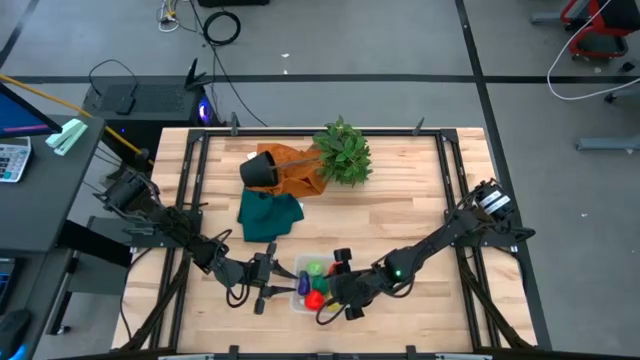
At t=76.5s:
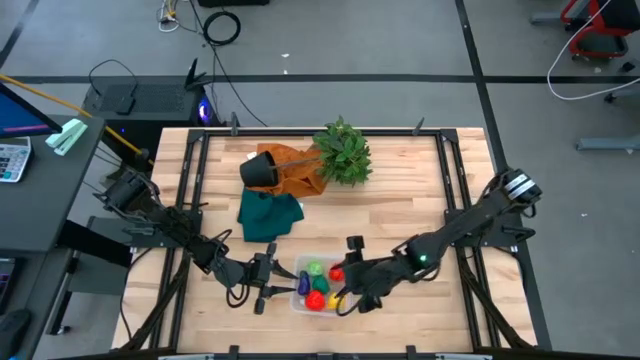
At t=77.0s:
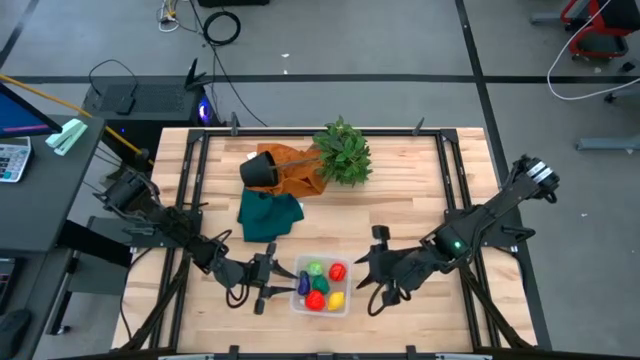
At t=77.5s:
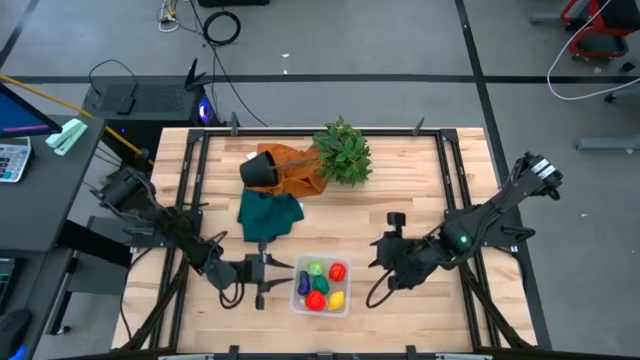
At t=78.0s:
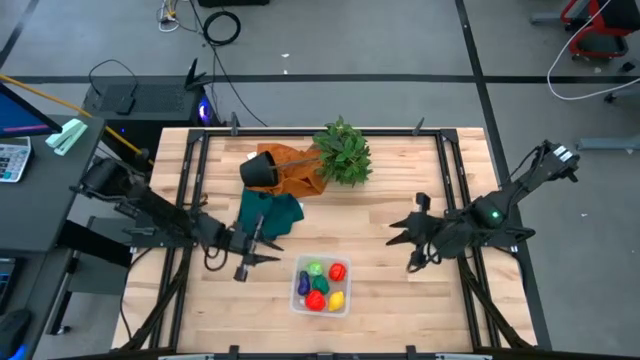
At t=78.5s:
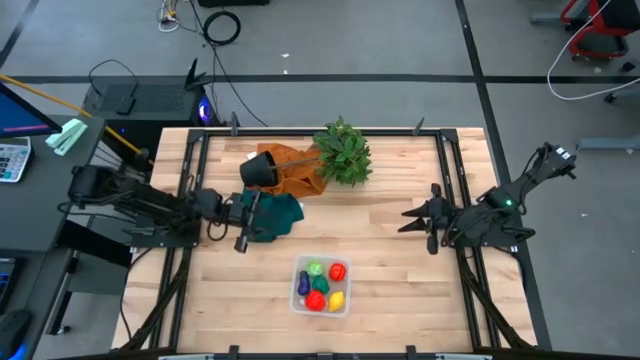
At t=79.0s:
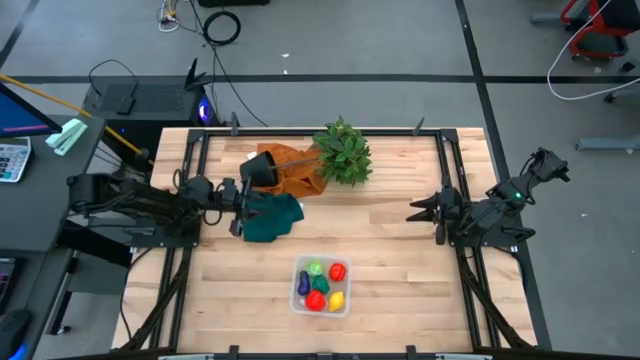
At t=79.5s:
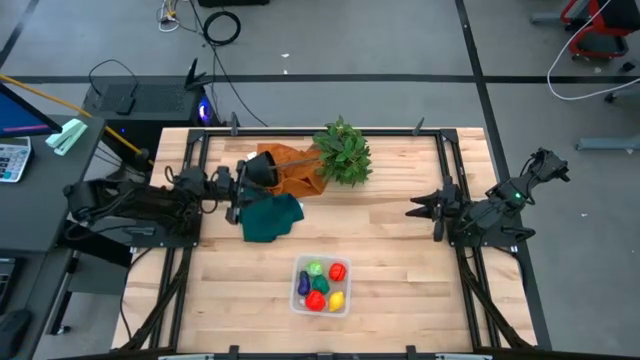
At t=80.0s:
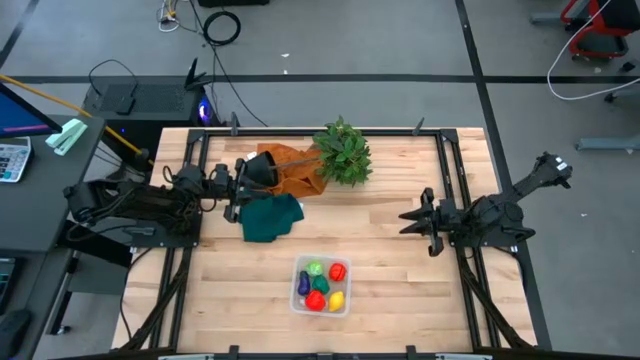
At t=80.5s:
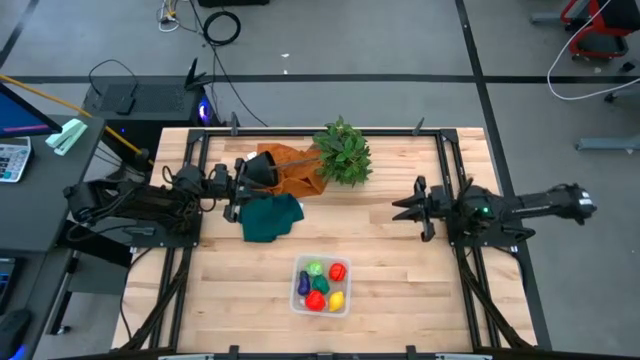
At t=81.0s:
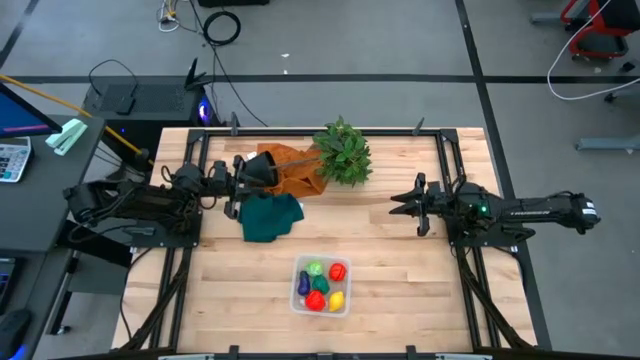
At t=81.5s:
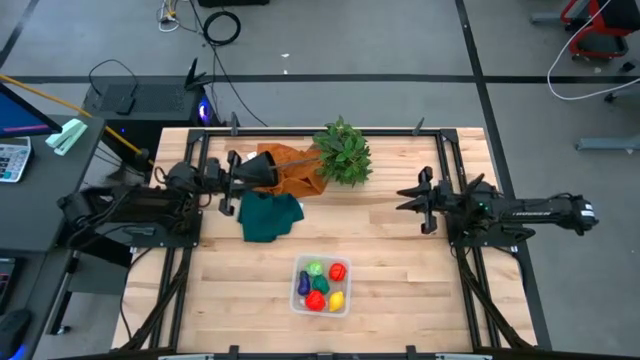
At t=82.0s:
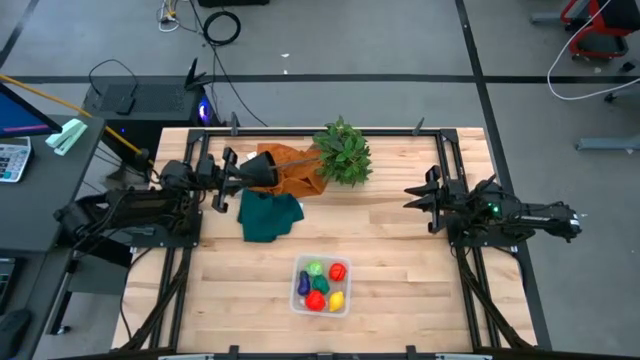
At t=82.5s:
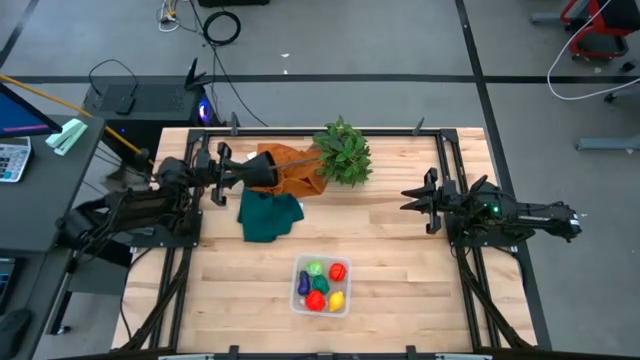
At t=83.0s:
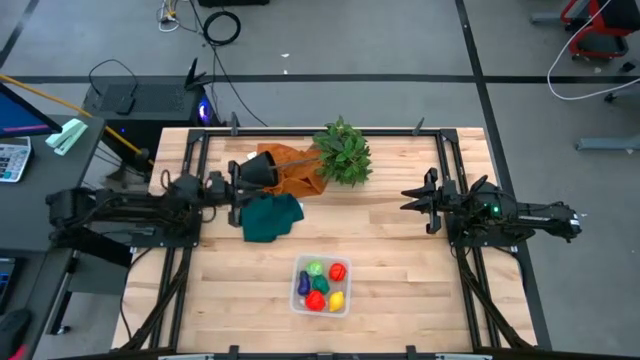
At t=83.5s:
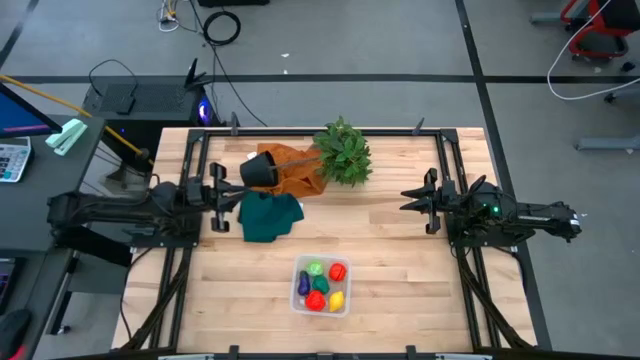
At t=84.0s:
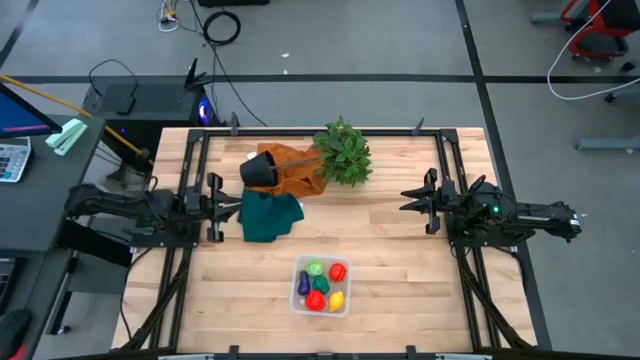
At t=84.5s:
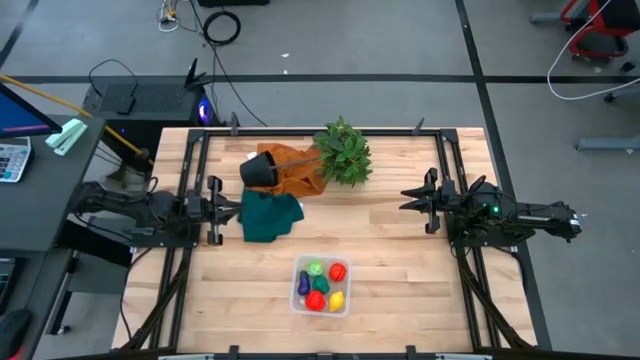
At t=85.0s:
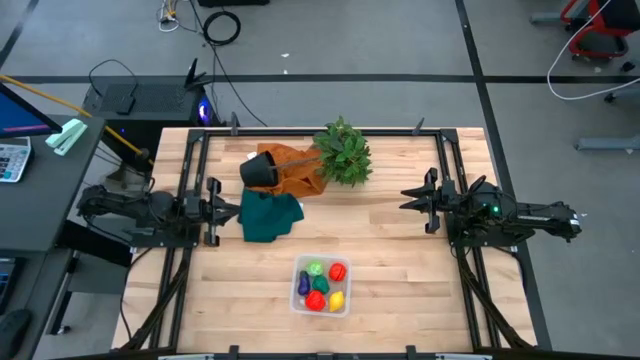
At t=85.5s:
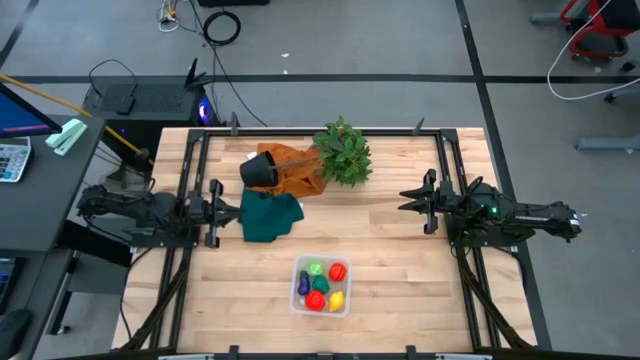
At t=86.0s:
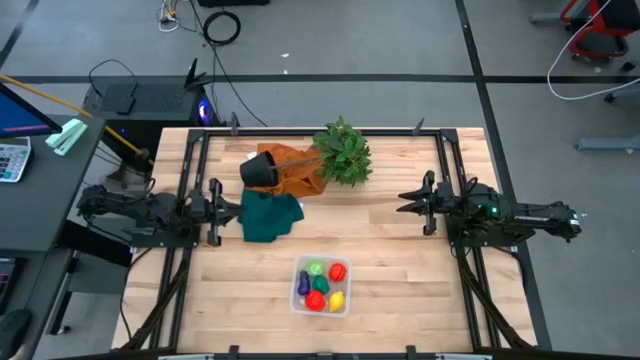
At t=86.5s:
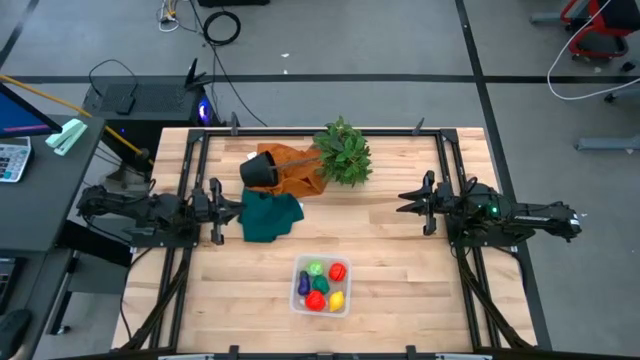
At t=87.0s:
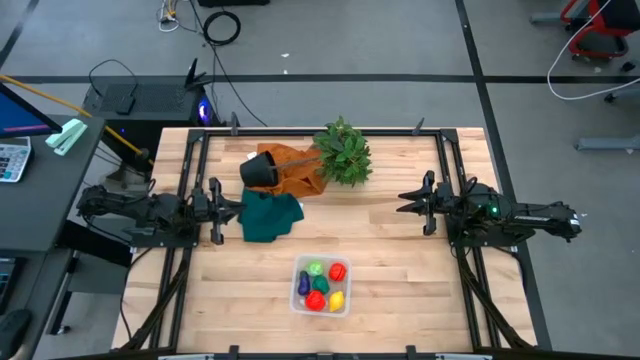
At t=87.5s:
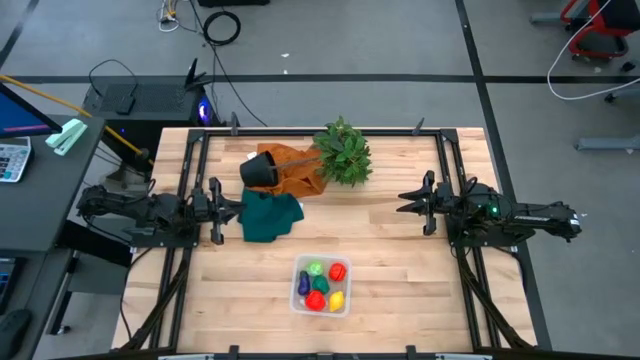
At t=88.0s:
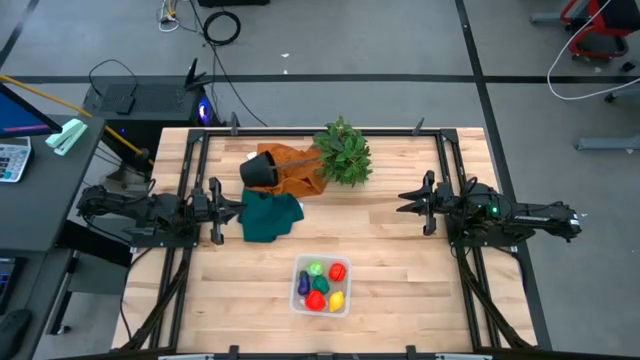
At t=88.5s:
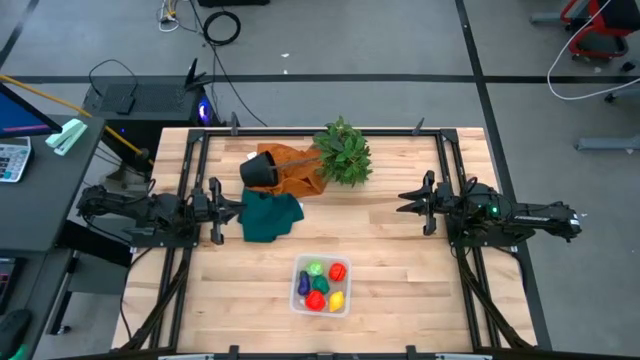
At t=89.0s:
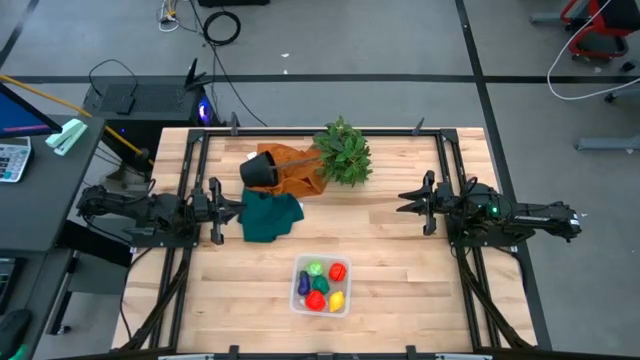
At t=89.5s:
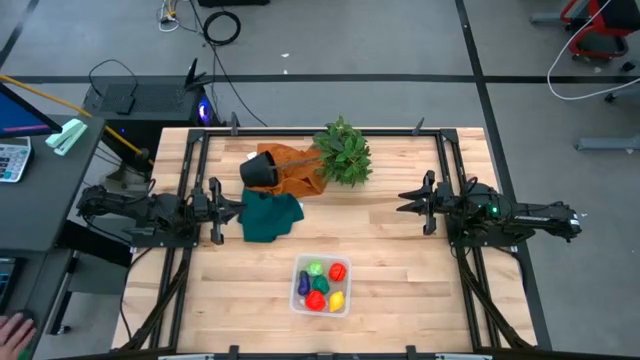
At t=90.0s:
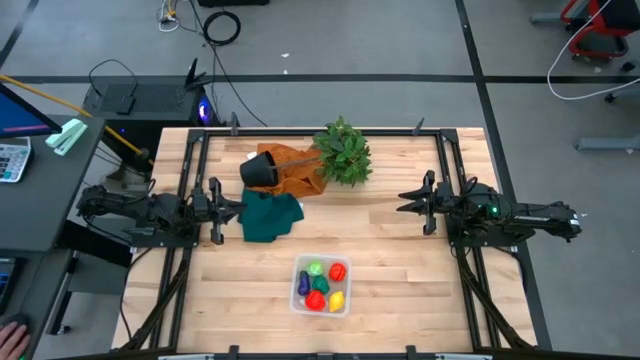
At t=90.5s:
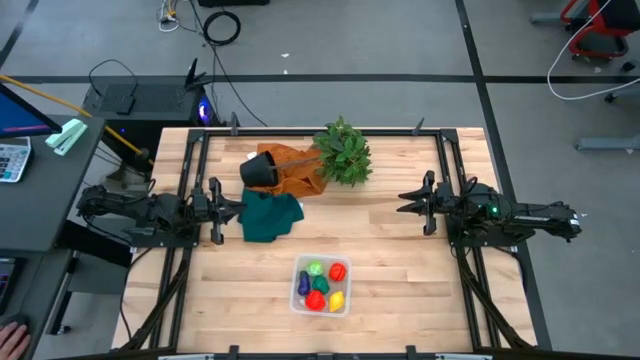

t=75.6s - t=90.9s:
Task: Pick and placing Produce into tupperware
Return to Home Position

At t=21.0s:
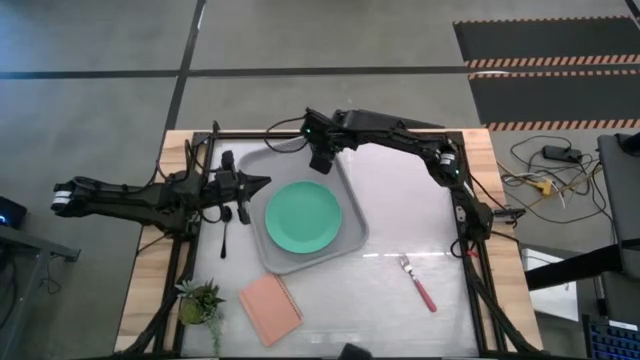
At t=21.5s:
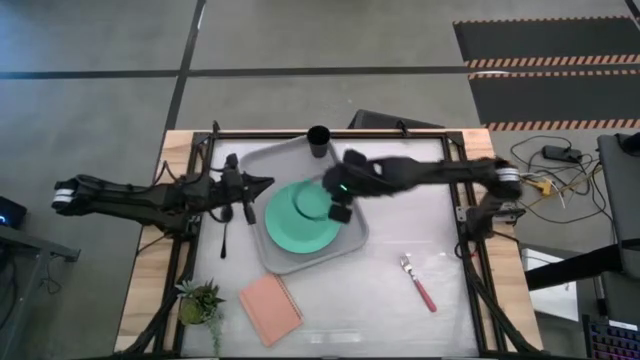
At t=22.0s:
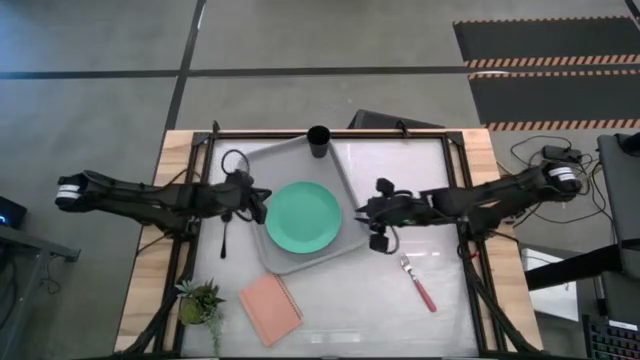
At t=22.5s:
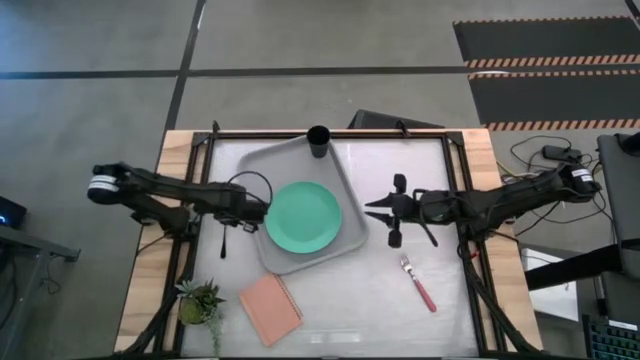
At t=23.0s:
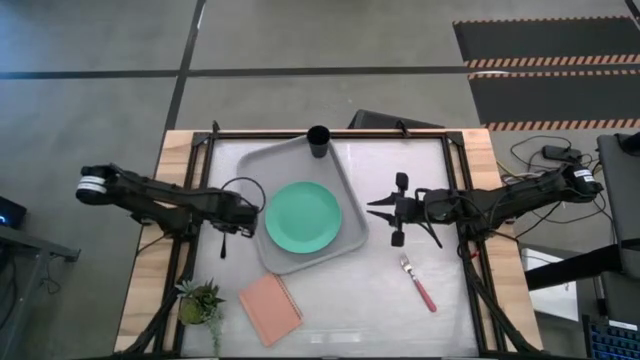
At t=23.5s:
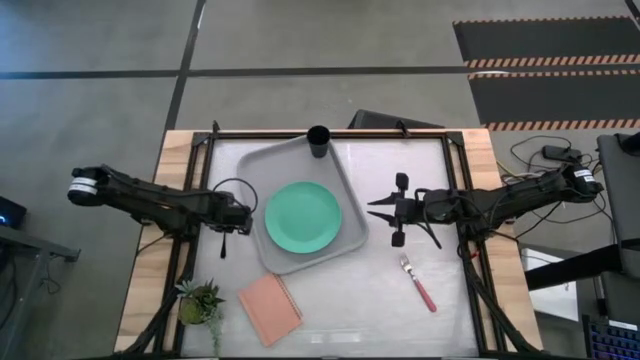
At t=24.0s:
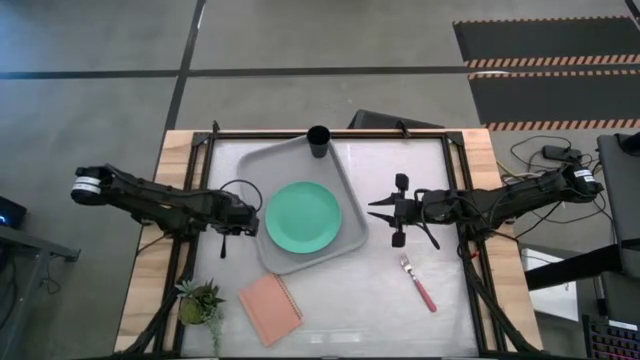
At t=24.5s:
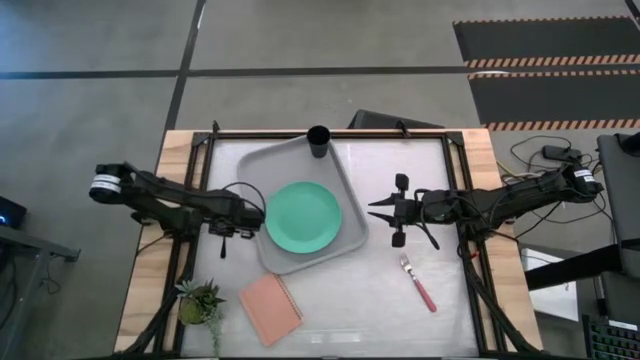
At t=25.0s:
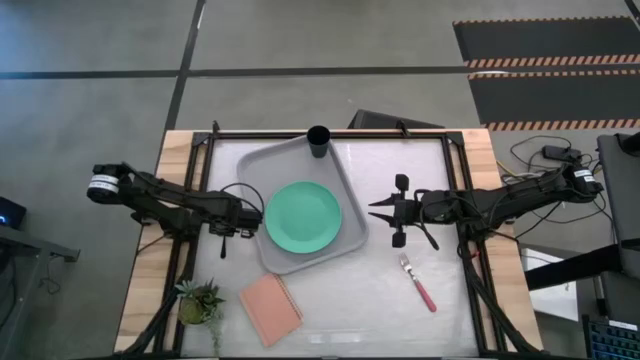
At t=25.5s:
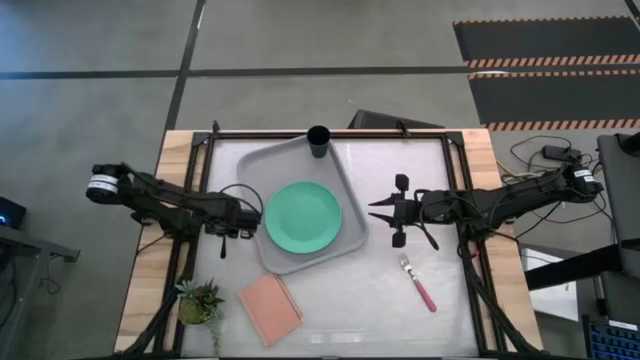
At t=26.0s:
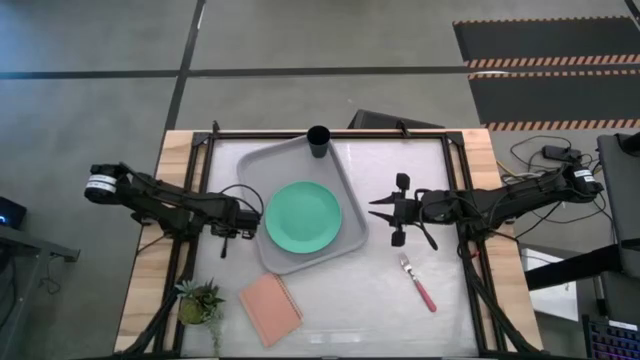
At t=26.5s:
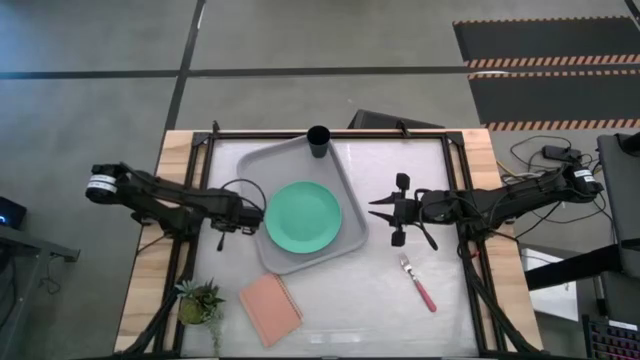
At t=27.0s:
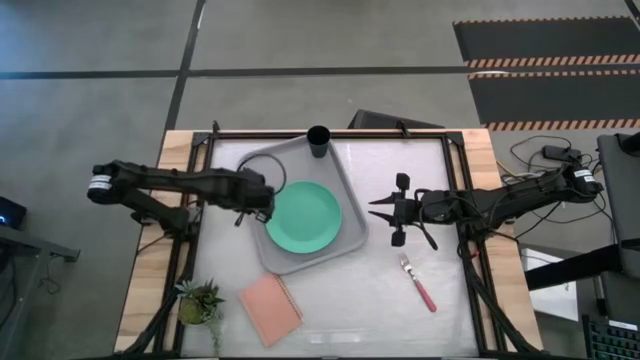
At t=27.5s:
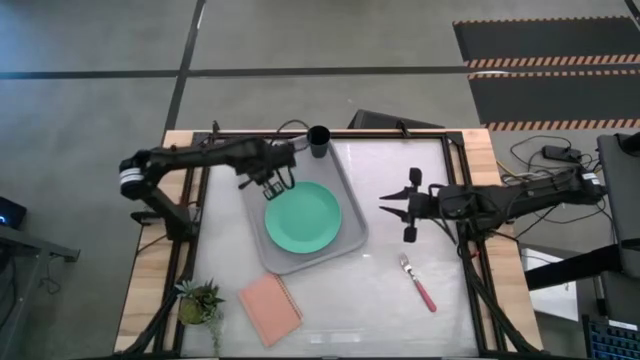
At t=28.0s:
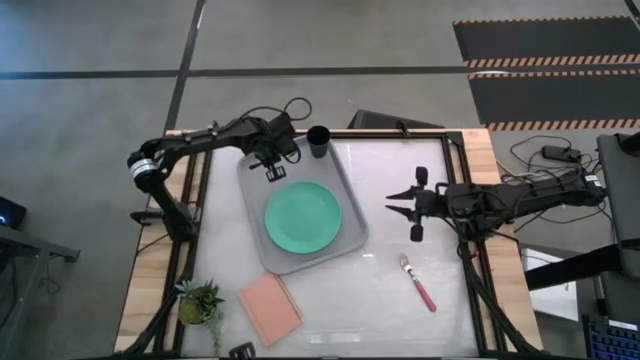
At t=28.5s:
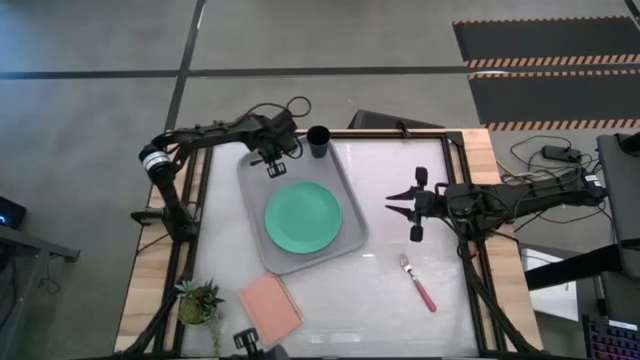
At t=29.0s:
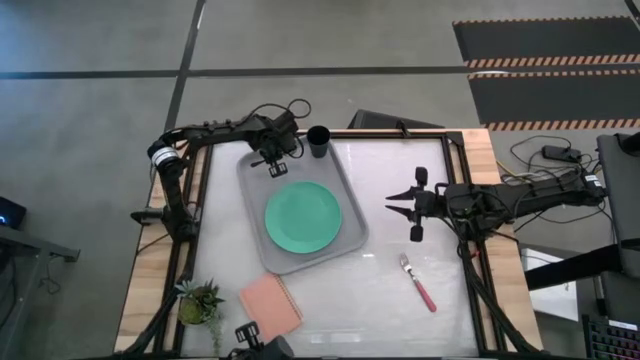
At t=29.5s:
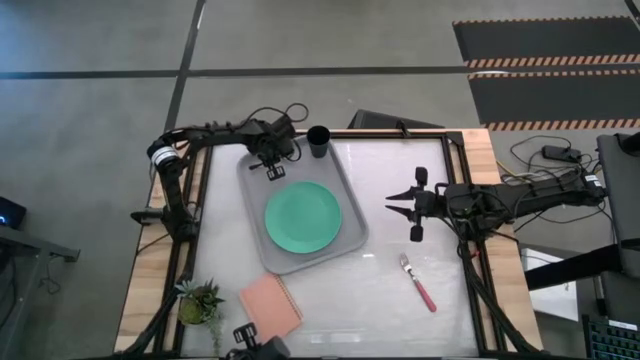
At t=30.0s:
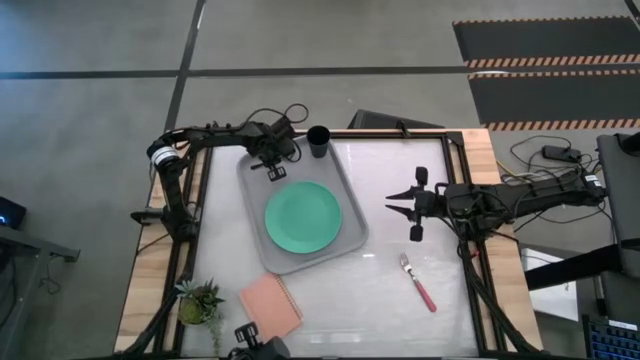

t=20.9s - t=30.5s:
Task: Pick and place plate/cup/fork/spoon on tray
Put the black spoon to the left side of the green plate on the gray serving tray
